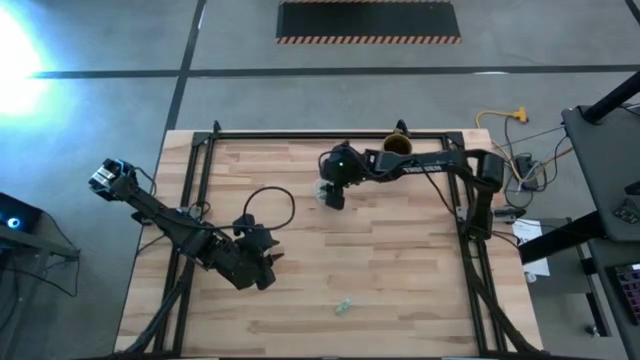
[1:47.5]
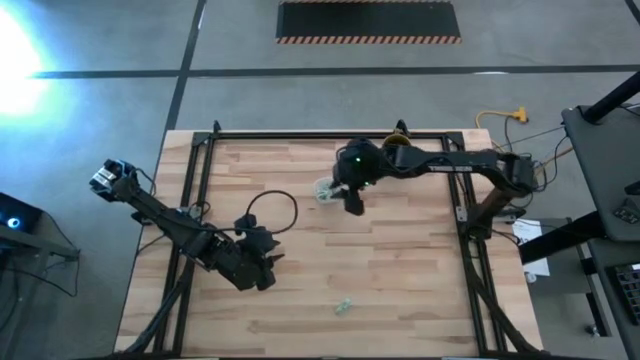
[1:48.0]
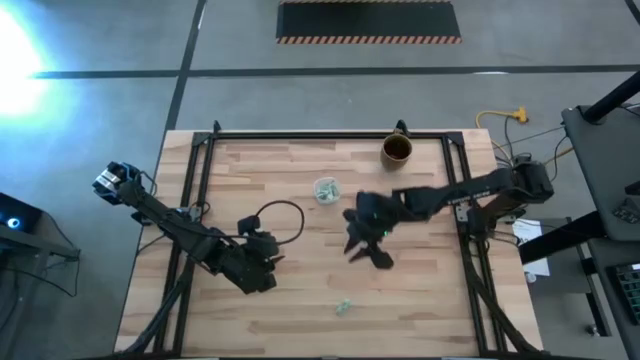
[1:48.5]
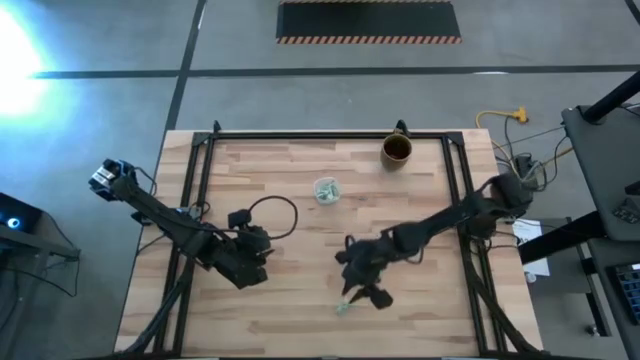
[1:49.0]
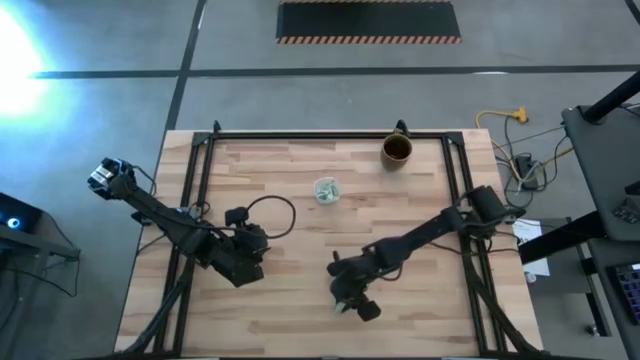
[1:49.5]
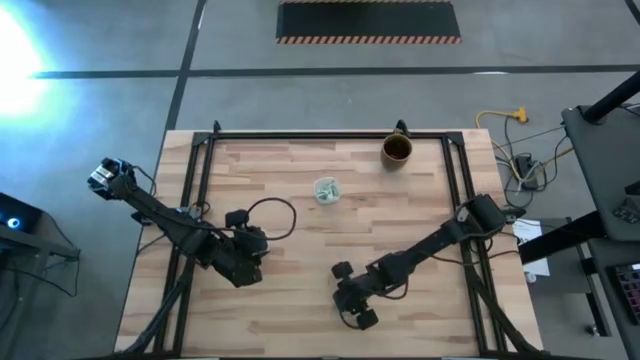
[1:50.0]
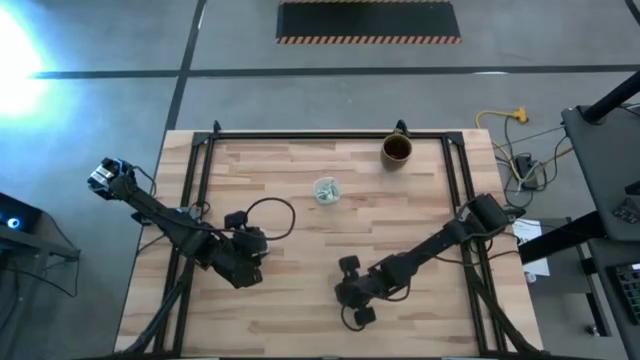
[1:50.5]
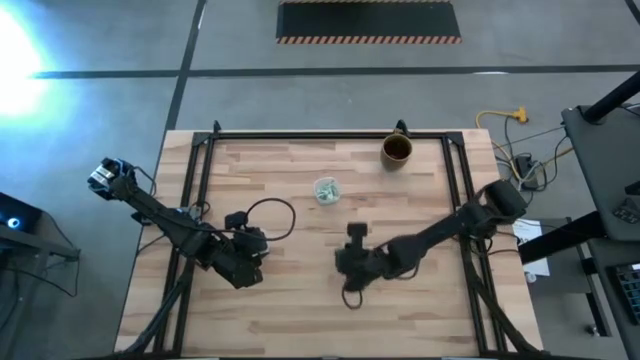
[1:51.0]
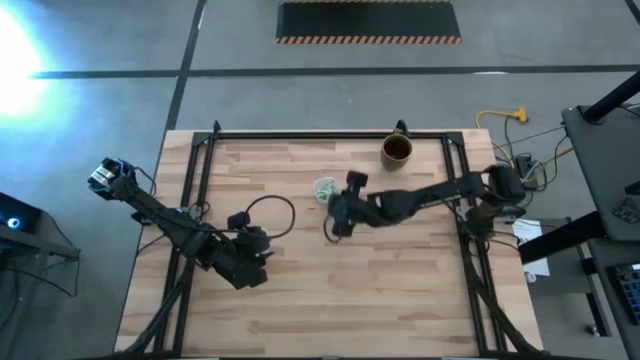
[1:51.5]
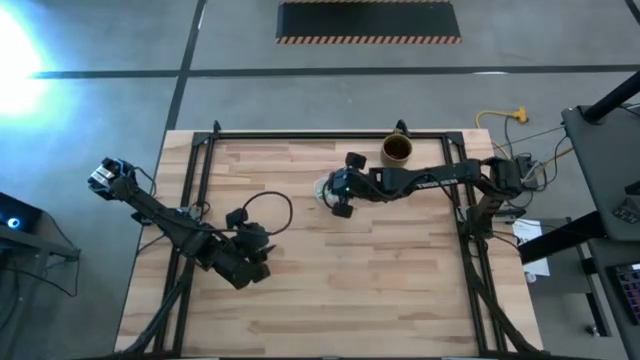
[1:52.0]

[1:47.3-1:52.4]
Task: Pick and place Stevia / Truvia into bins
Put the stevia packet into the top transparent container

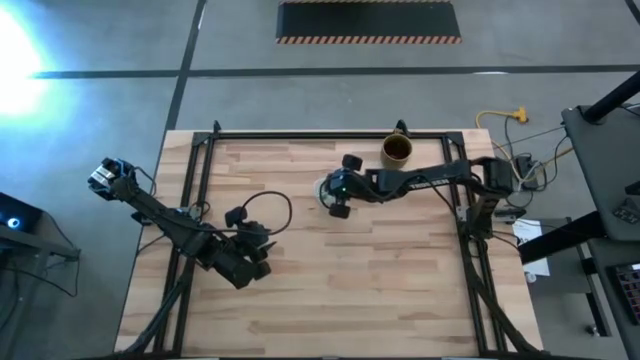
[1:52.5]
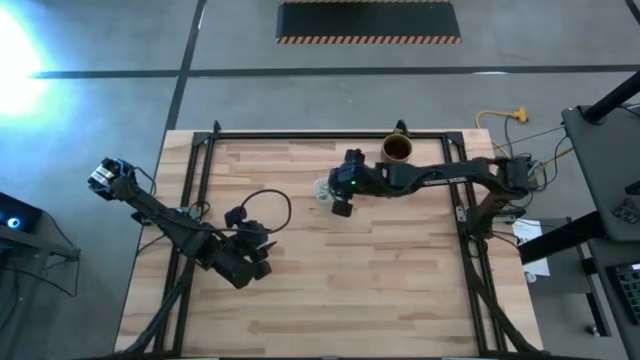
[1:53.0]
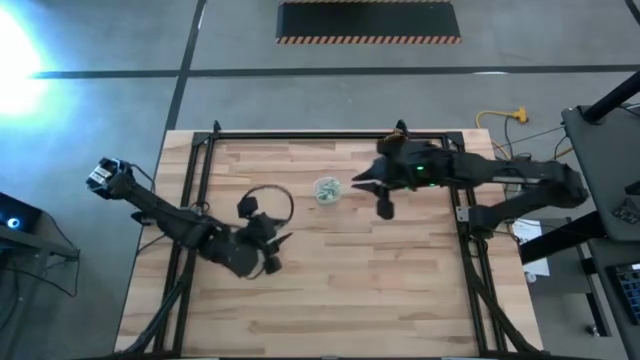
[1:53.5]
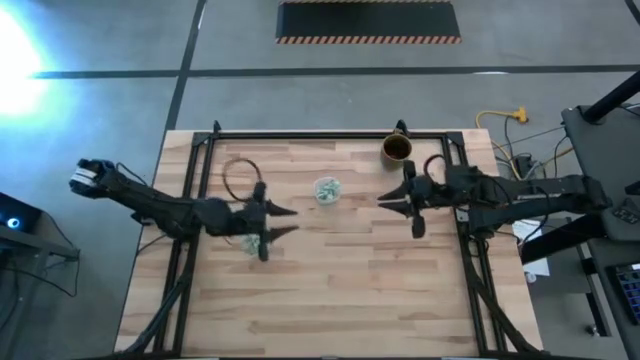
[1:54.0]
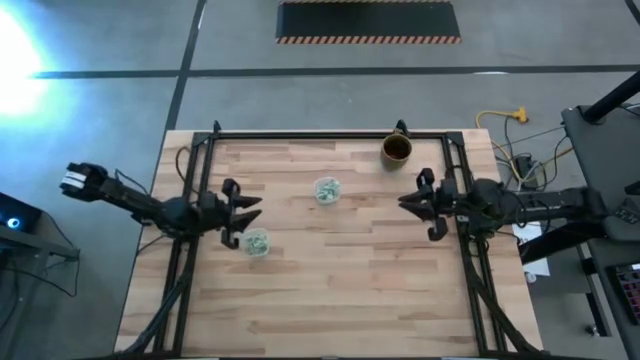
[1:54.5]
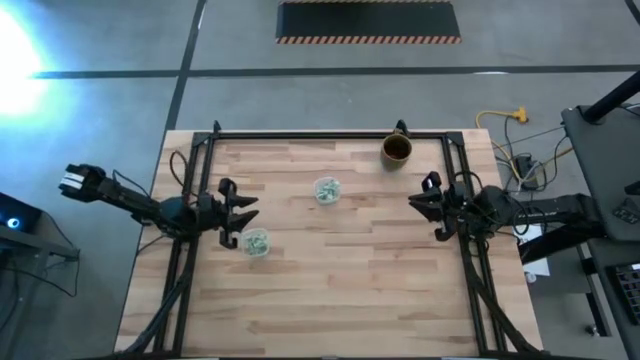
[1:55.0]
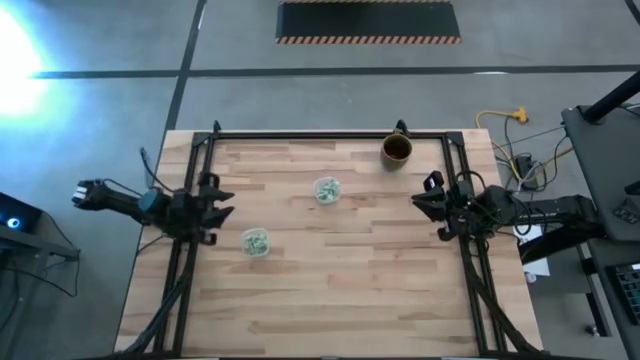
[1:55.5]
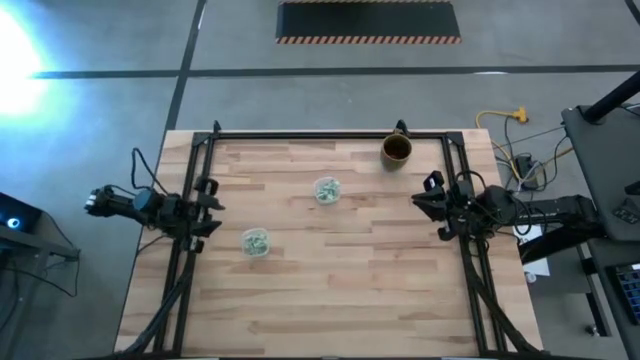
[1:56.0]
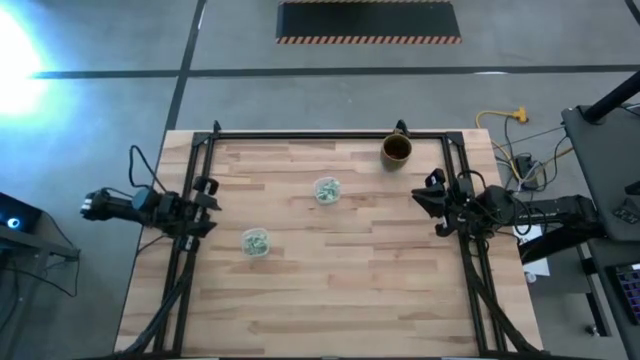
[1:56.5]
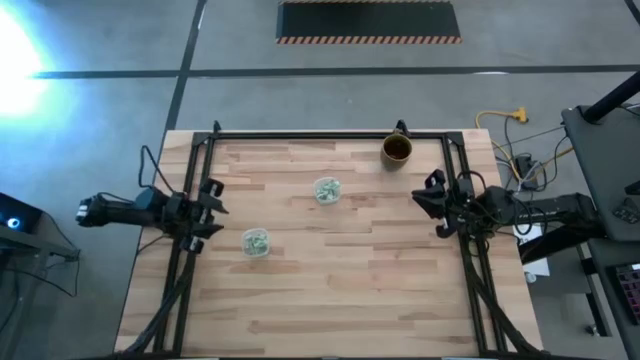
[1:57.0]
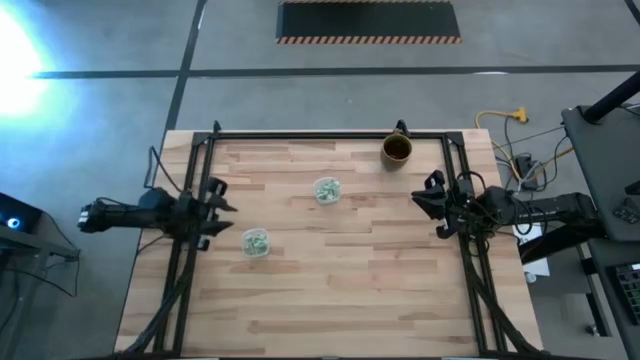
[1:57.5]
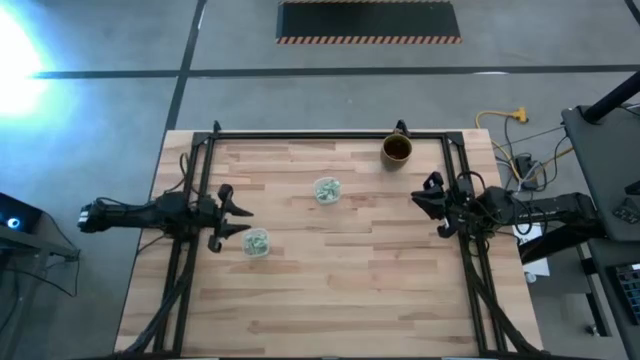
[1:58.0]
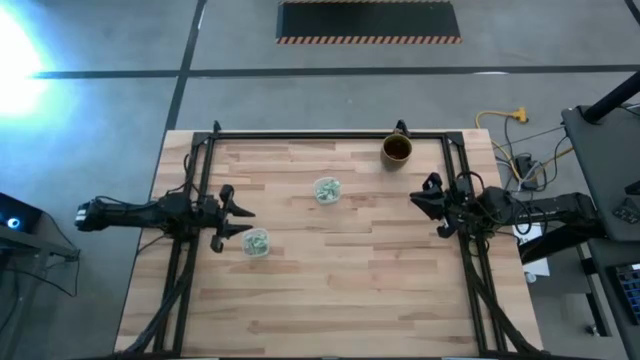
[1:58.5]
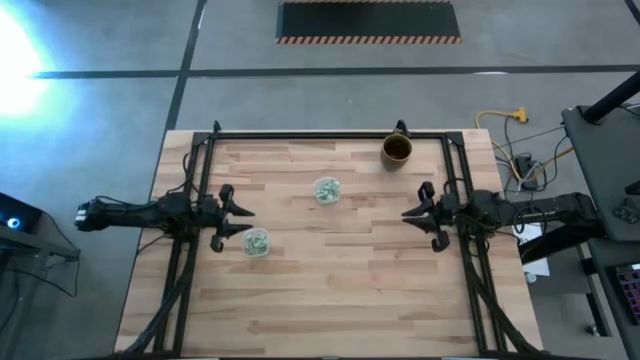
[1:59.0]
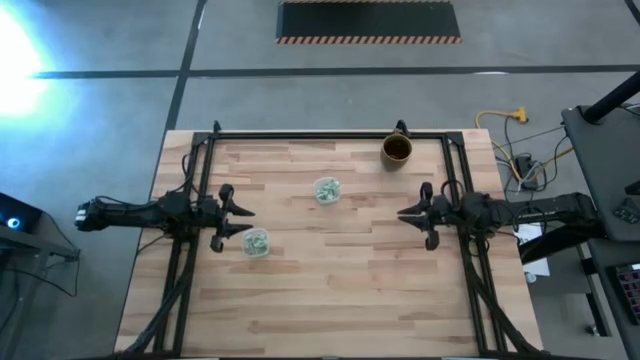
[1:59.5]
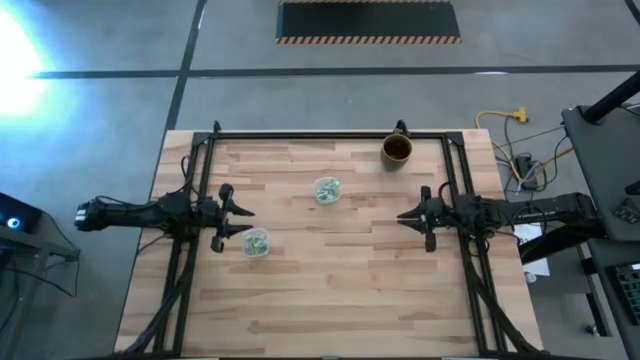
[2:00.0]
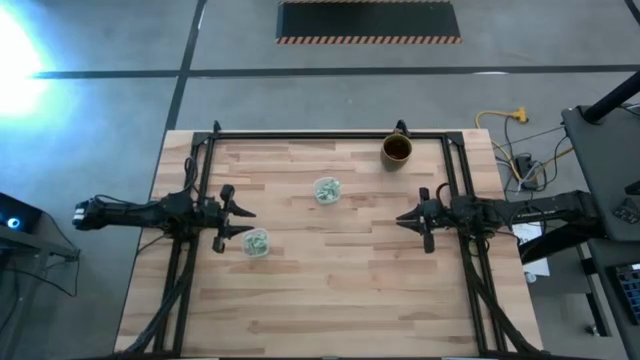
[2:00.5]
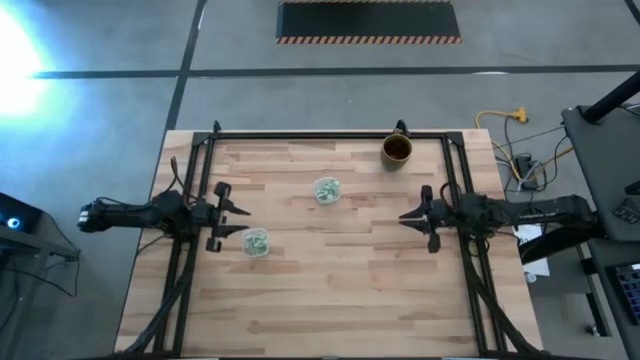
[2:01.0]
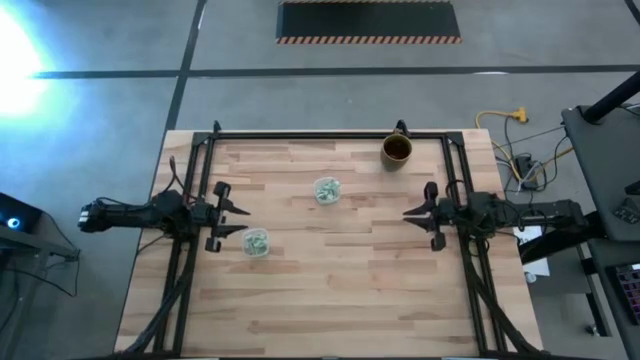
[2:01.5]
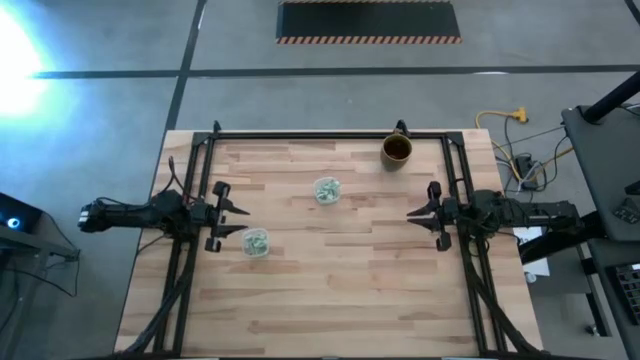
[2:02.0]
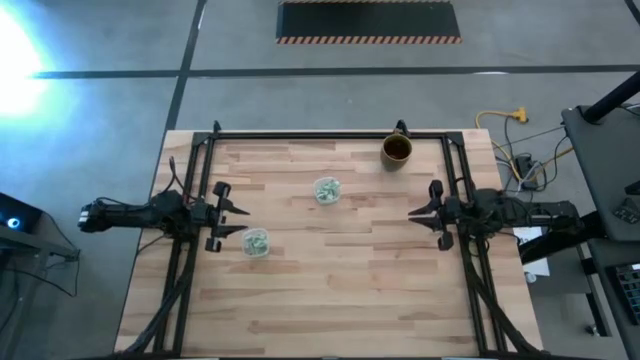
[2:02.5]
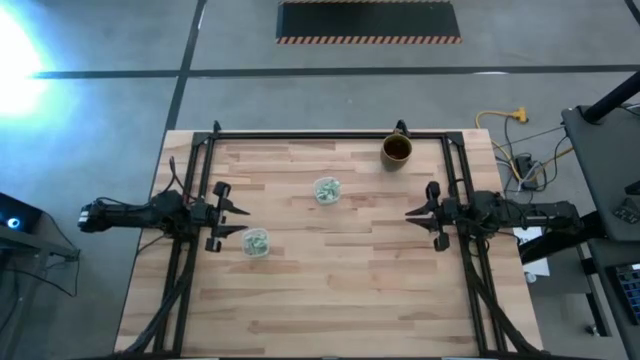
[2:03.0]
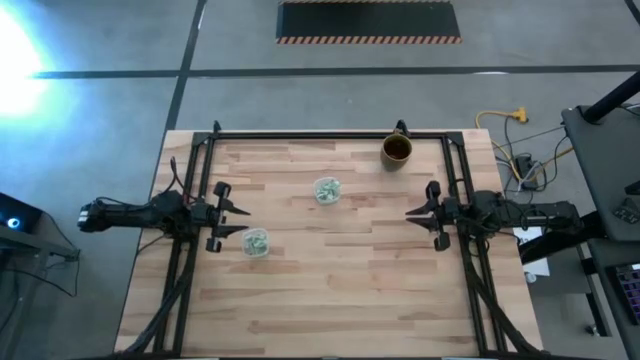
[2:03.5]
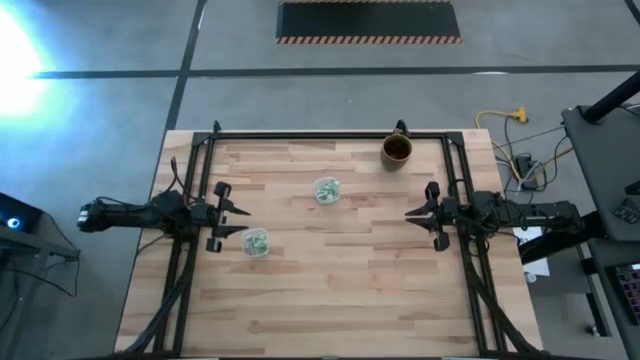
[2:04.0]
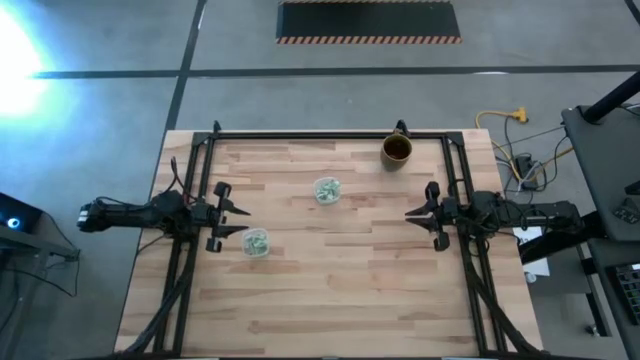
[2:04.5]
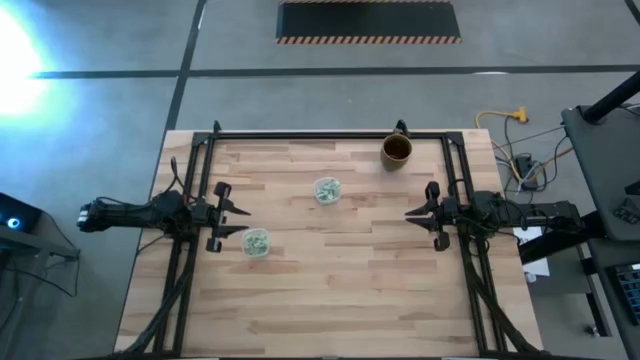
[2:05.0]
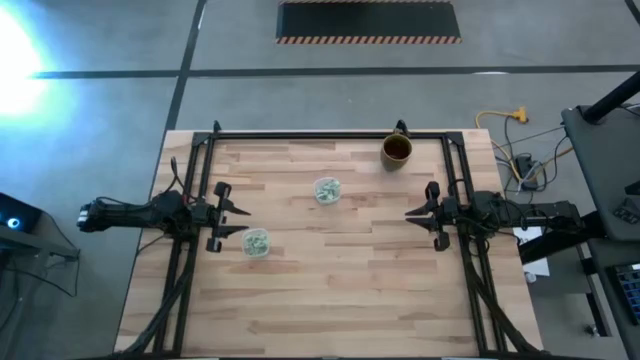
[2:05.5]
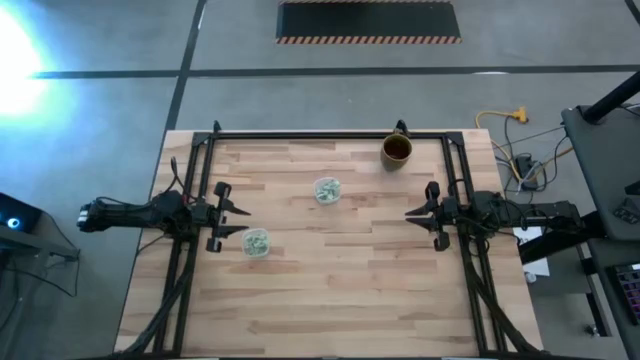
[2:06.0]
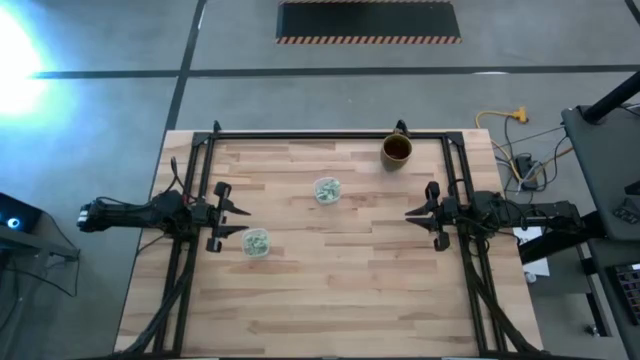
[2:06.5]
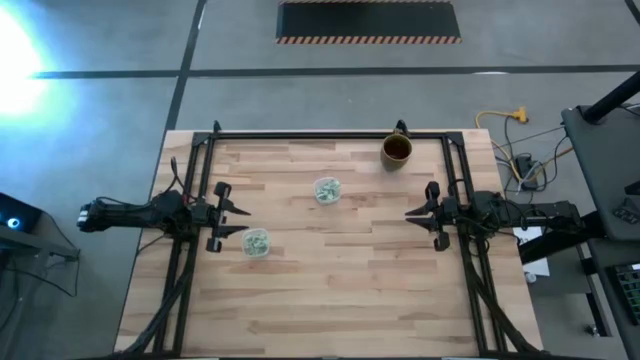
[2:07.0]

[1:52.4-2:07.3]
Return to Home Position

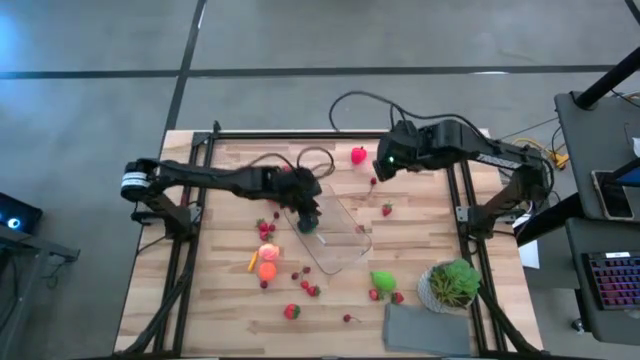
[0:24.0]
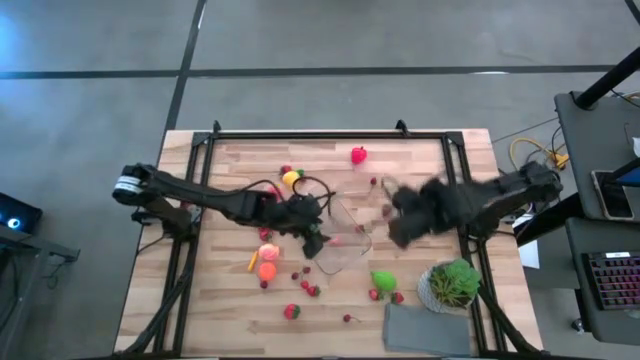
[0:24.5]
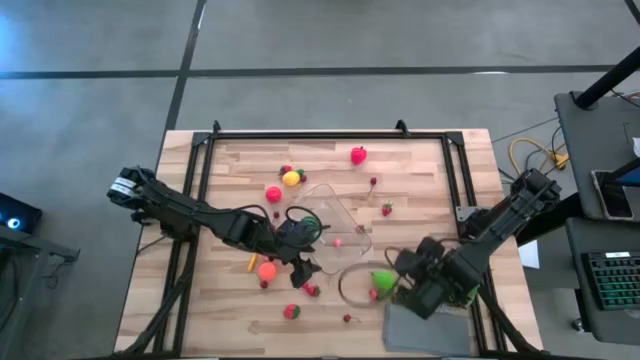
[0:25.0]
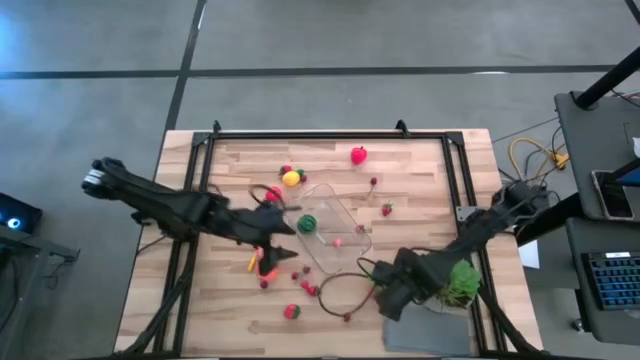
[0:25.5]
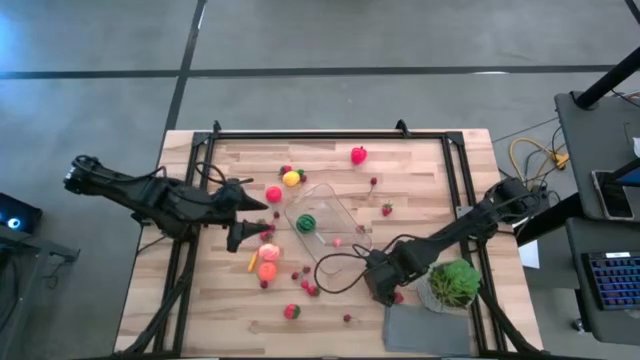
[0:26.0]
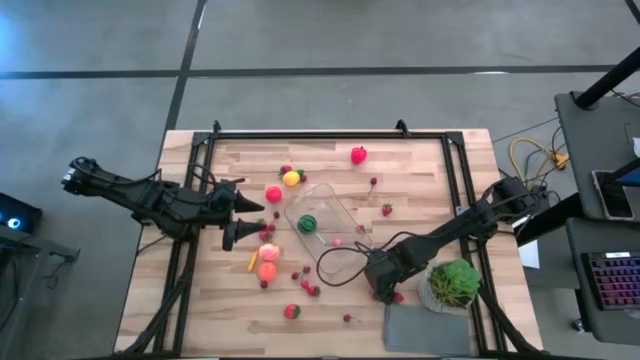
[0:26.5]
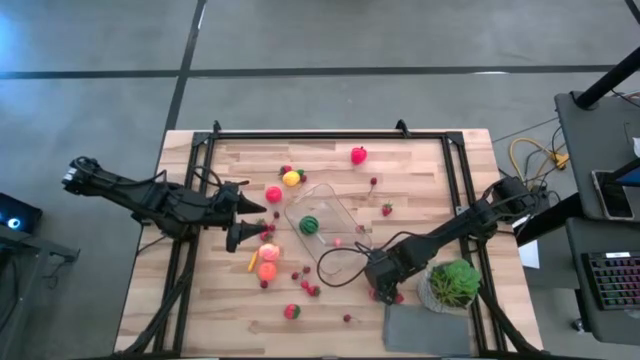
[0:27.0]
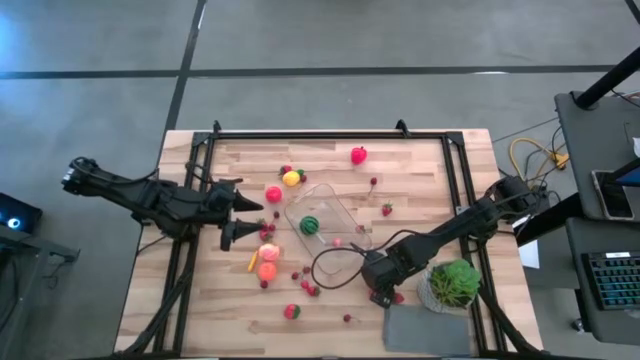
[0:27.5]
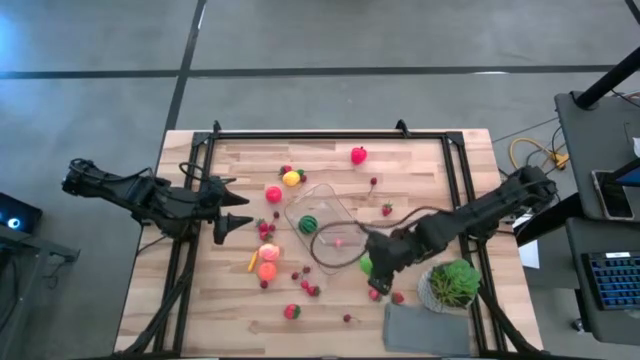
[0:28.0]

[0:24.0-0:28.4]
Task: Pick and placing Produce into tupperware
Put the green melon into the transparent bin
